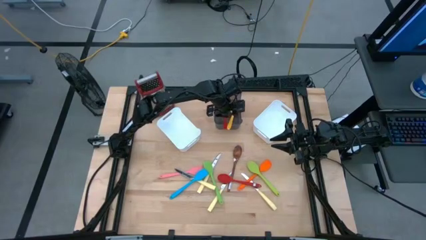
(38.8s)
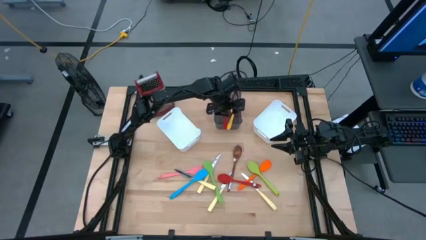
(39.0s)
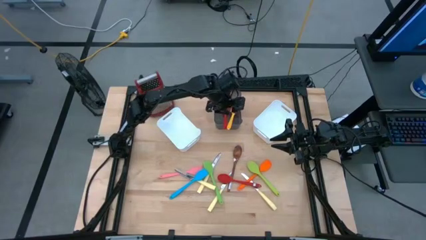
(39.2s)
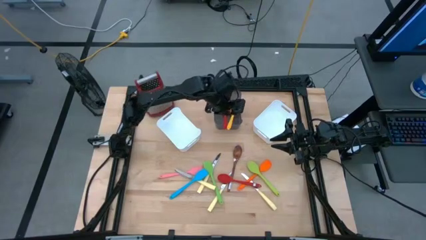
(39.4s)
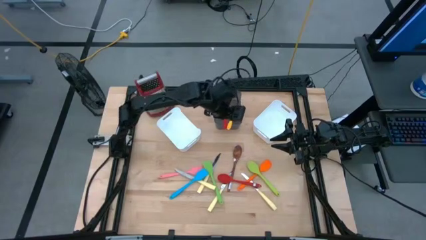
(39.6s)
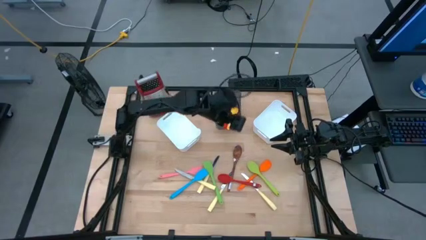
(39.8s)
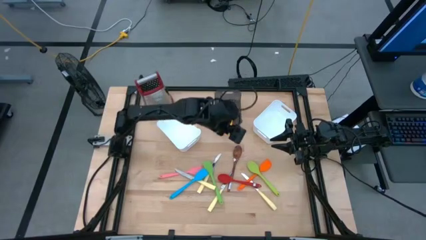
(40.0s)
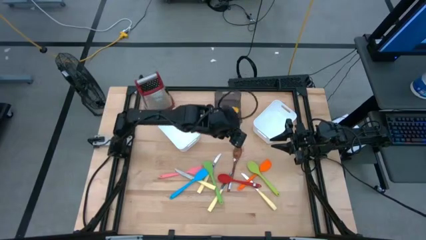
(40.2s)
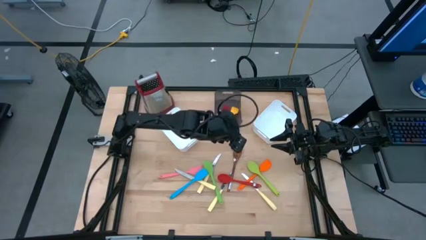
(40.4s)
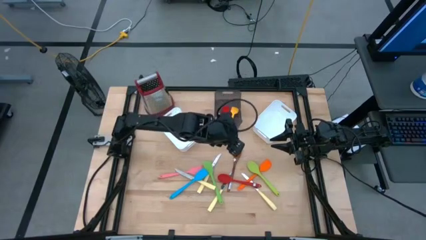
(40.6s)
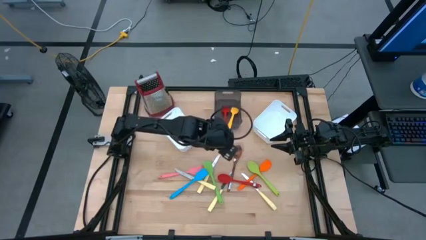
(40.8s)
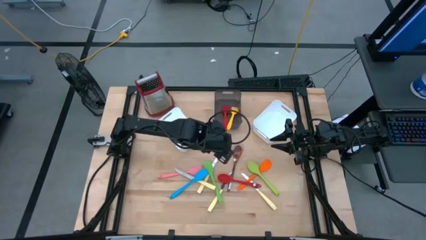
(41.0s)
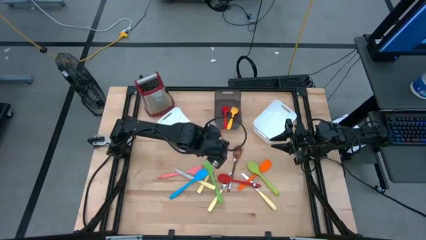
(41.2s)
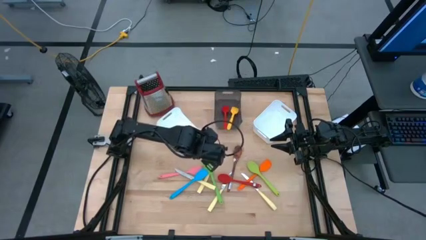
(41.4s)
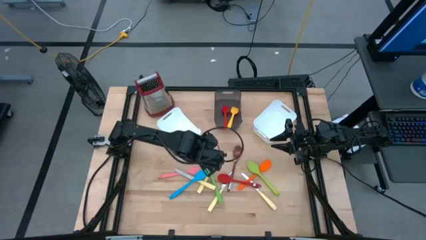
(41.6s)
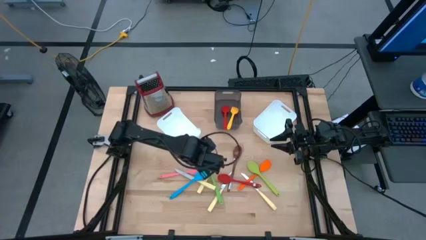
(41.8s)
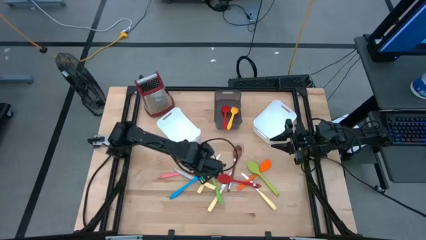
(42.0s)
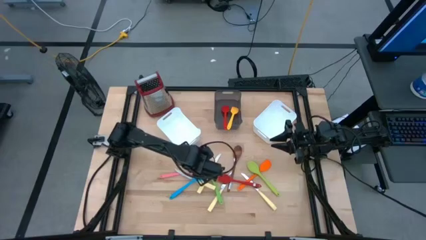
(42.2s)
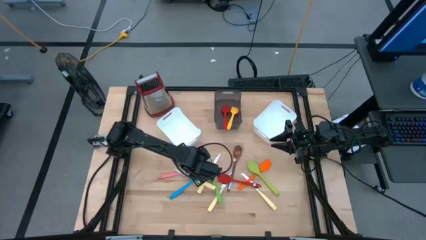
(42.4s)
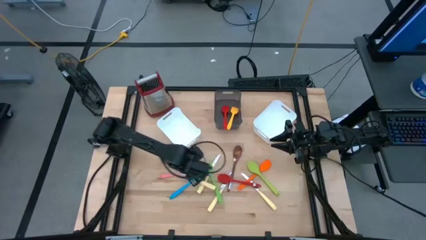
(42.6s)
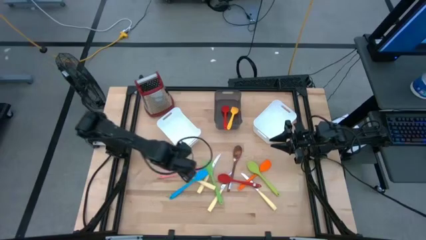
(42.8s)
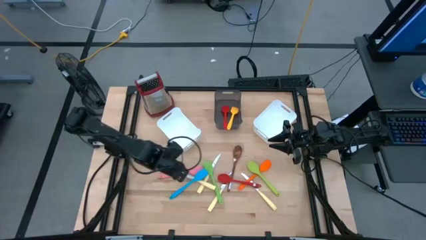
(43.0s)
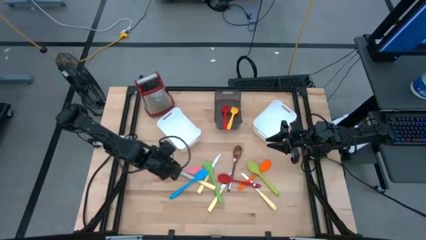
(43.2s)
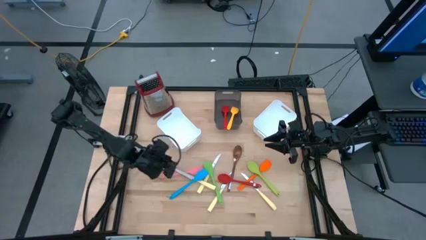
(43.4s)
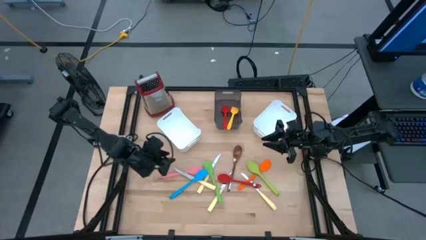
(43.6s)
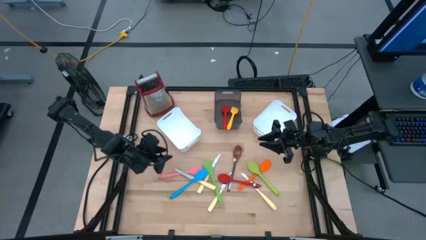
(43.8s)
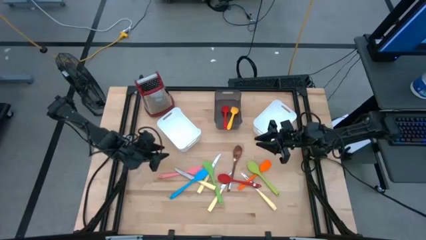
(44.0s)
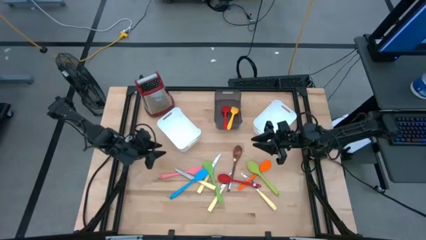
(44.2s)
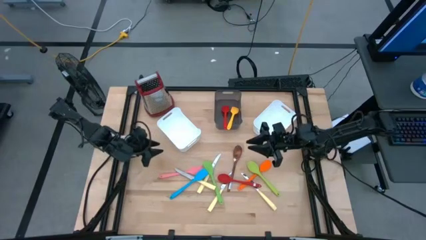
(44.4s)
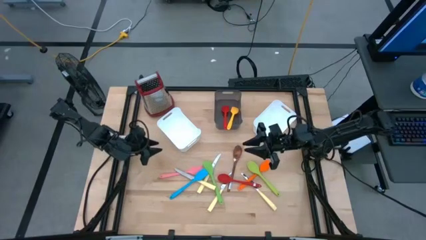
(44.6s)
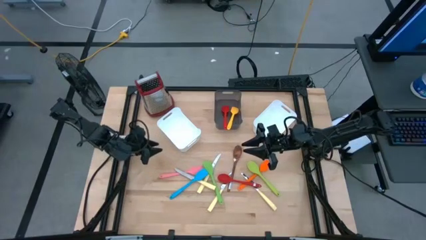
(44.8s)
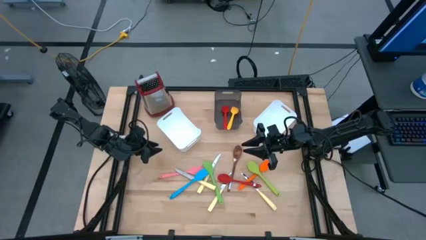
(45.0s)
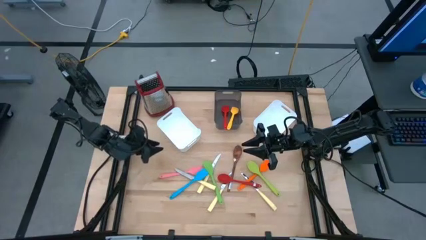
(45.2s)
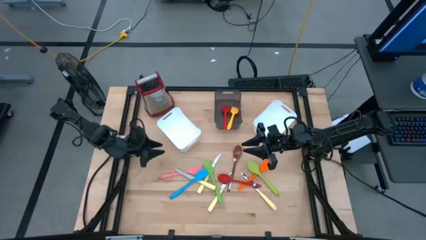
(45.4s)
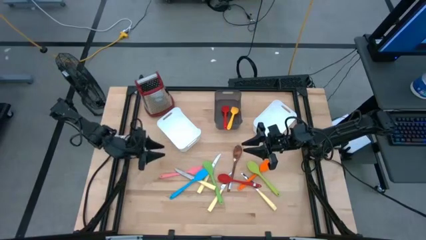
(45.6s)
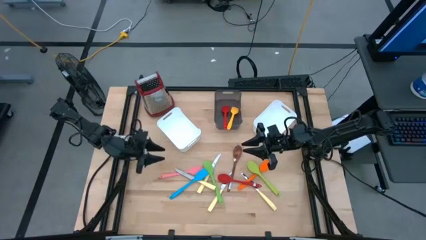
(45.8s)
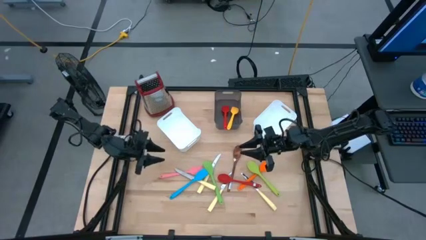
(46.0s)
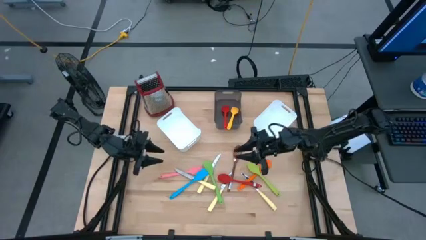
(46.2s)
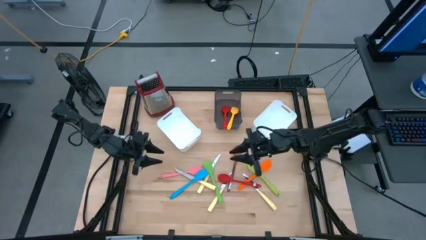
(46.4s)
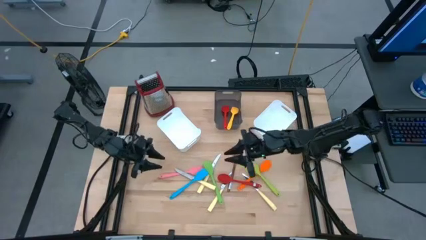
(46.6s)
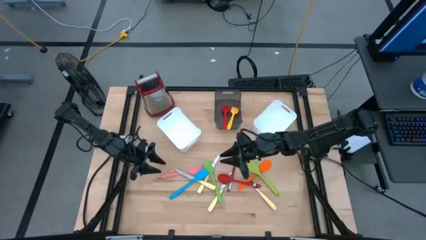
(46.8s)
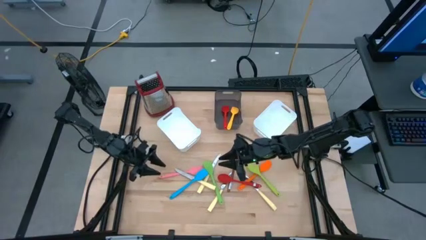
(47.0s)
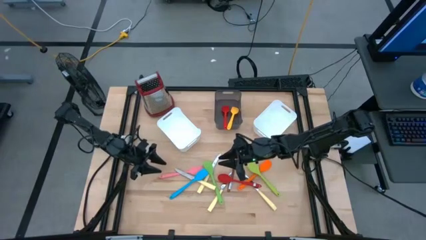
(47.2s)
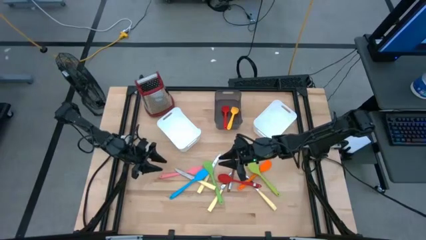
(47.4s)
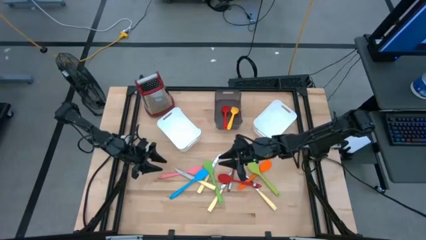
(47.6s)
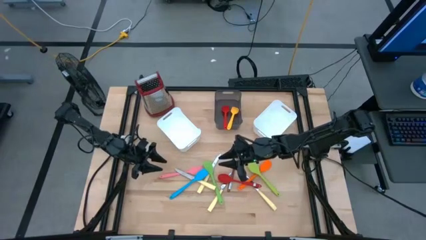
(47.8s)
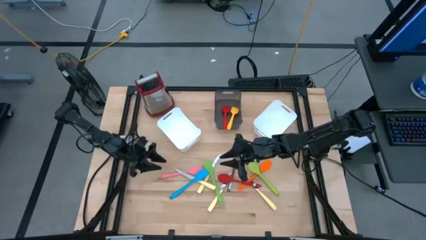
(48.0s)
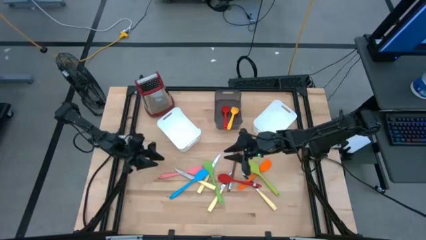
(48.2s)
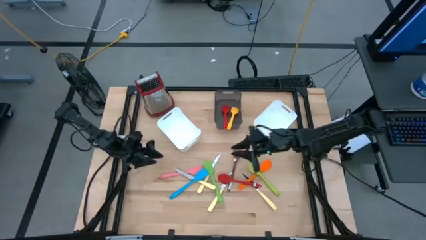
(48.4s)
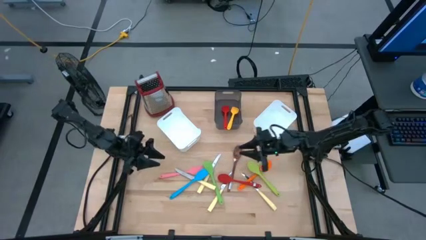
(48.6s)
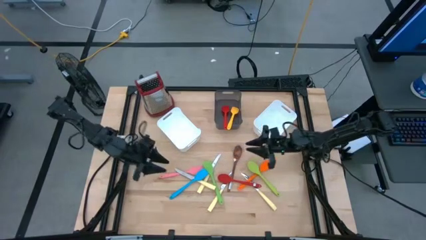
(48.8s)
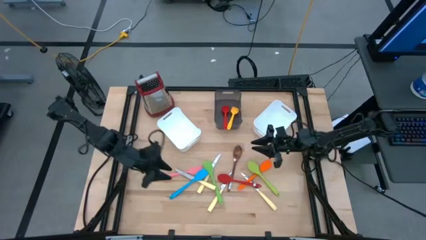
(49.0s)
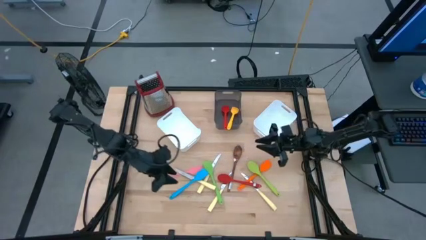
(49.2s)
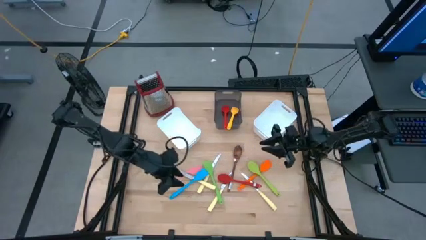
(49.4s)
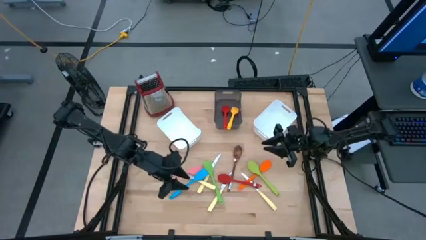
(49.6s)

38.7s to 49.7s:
Task: Pick & Place Kitchen Items
Put the blue spatula into the black bin
